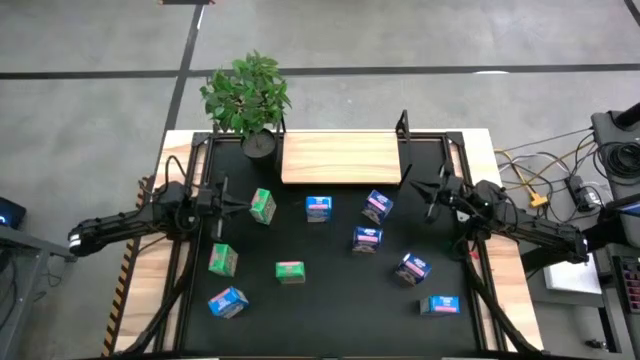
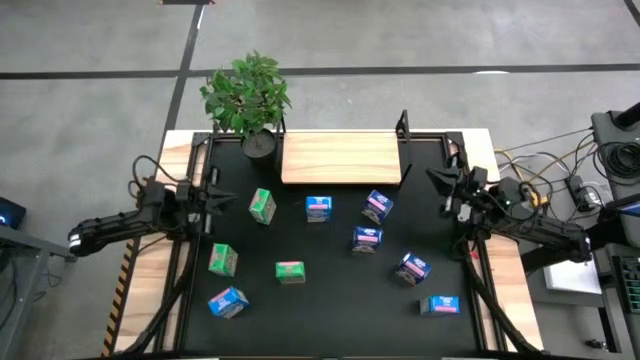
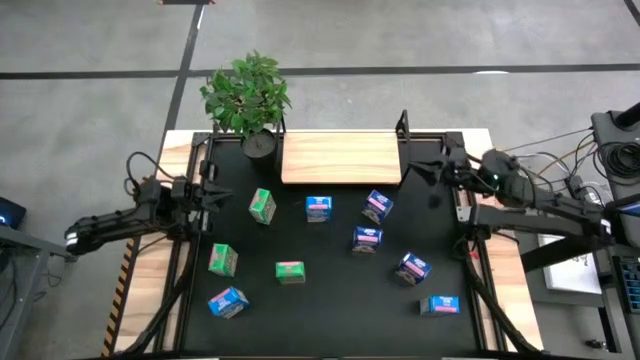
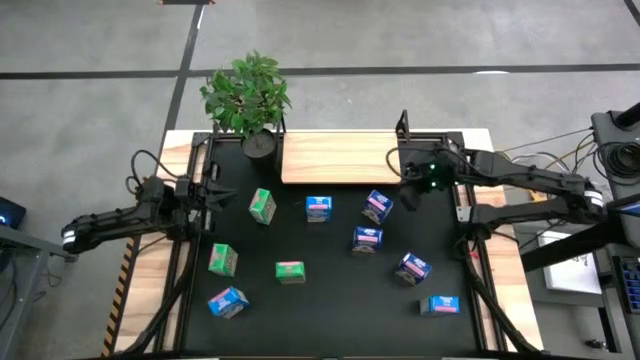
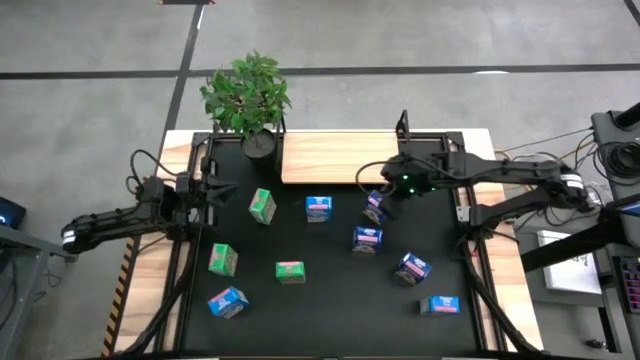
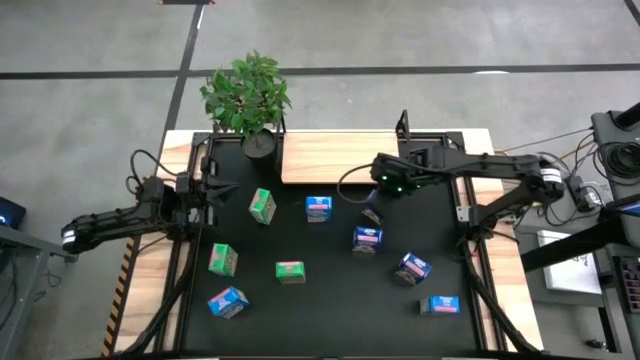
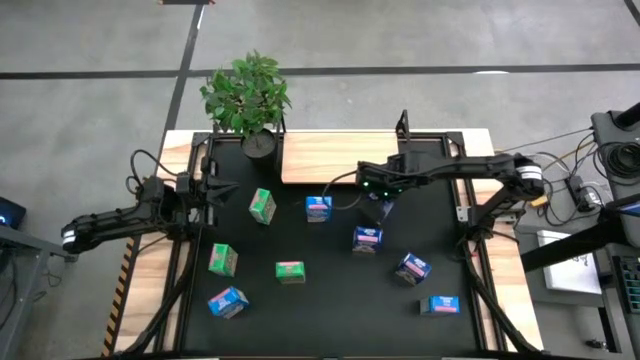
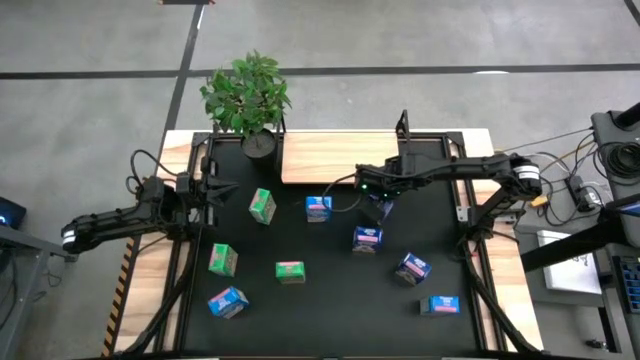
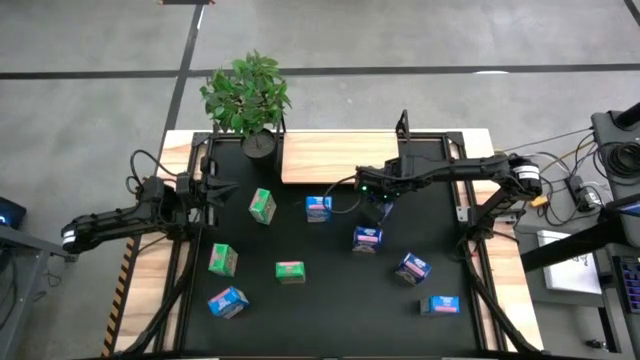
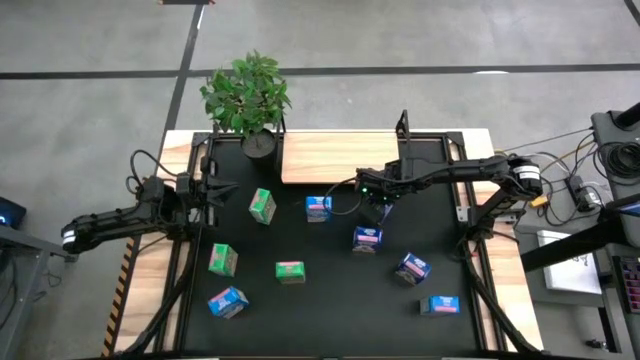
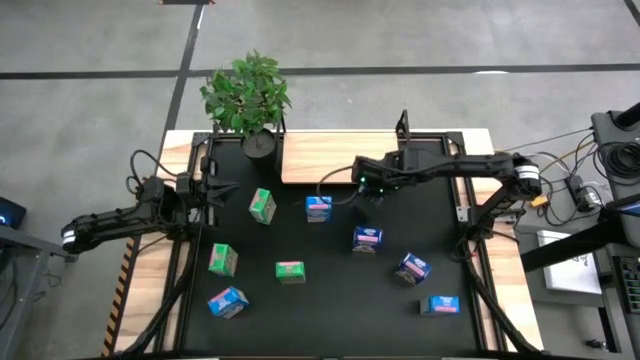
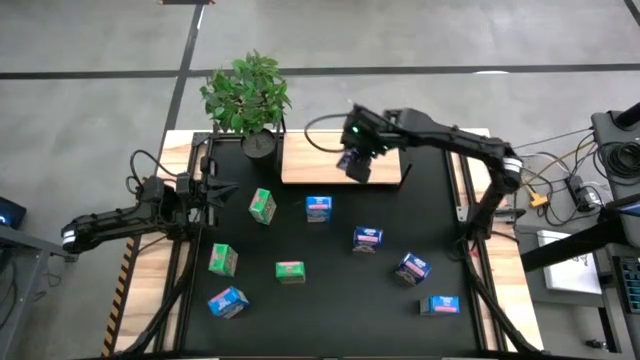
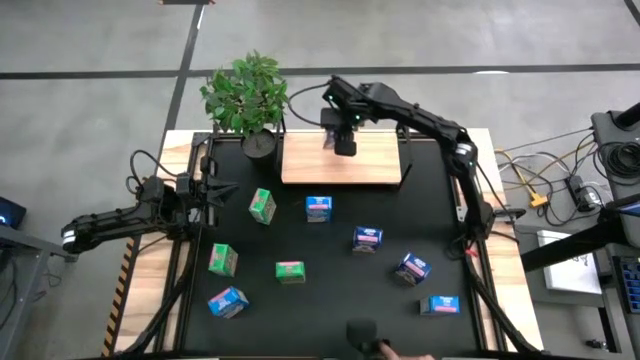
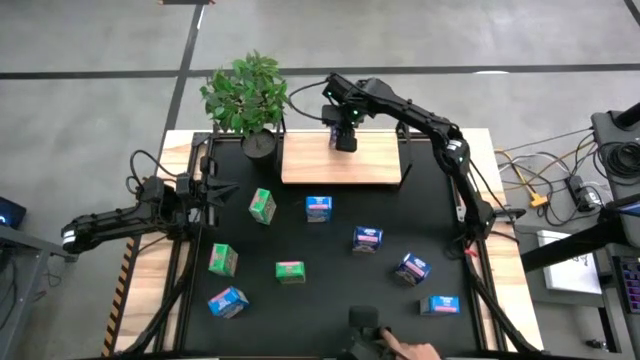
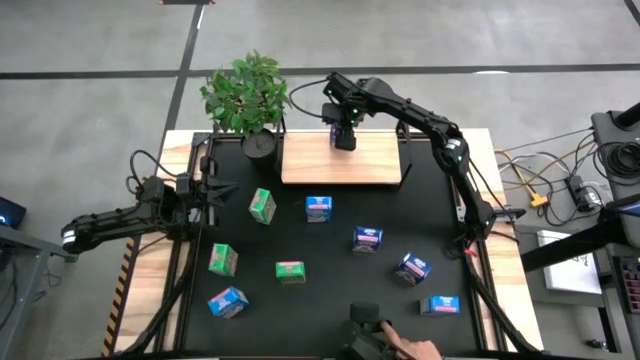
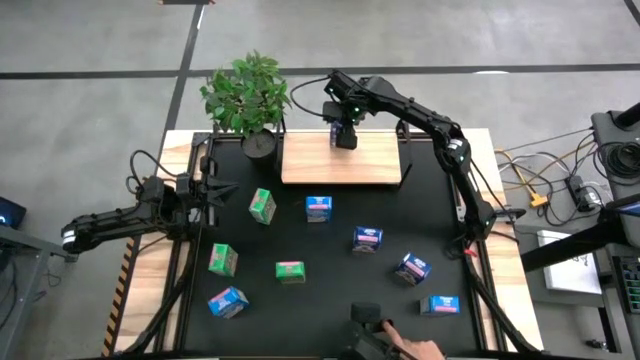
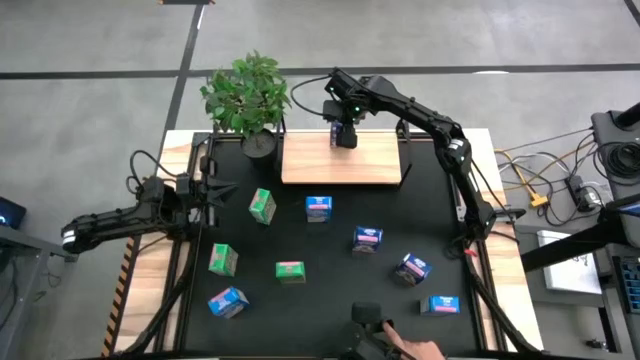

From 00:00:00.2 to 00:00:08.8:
Task: Stack cereal on shelf
Put the top blue cereal box on the shelf

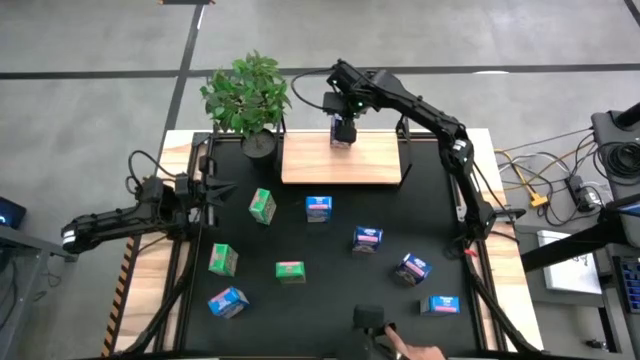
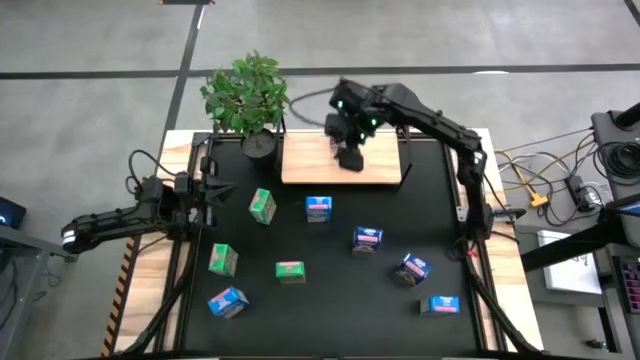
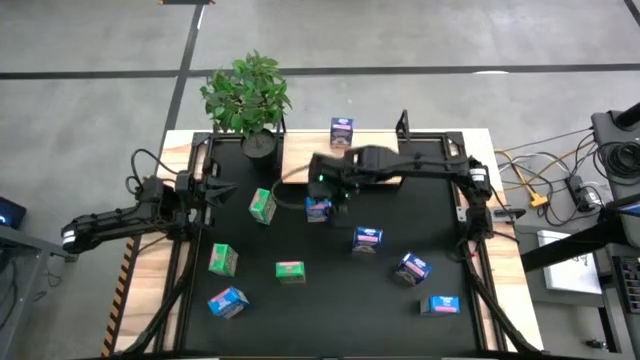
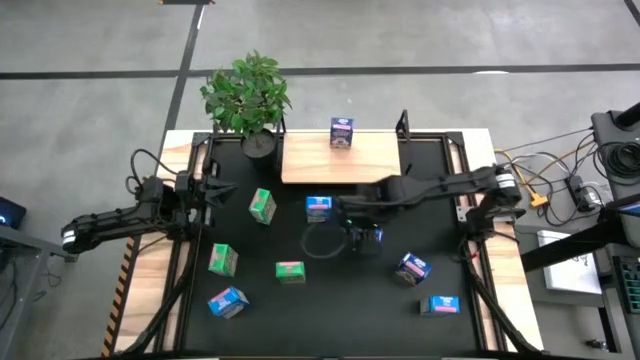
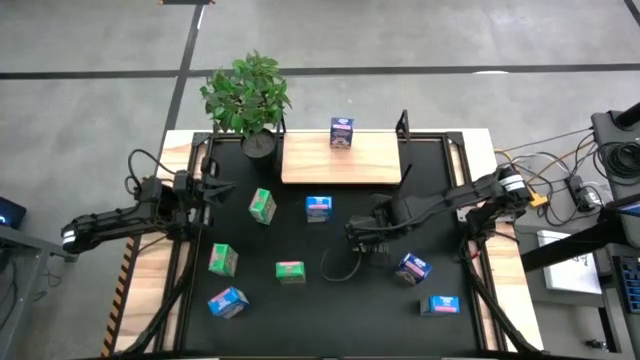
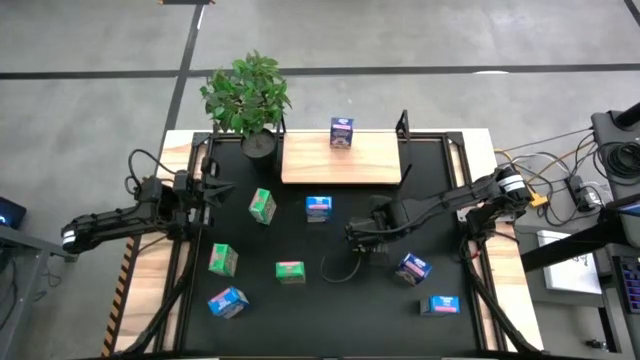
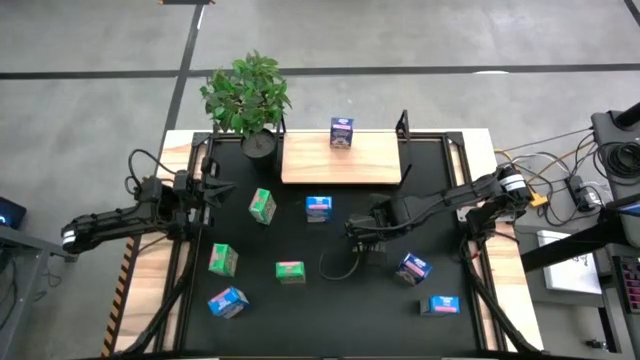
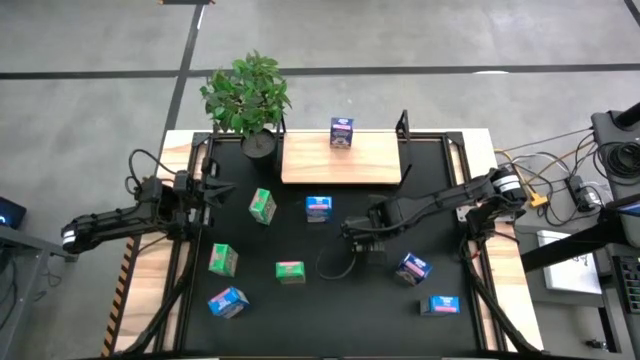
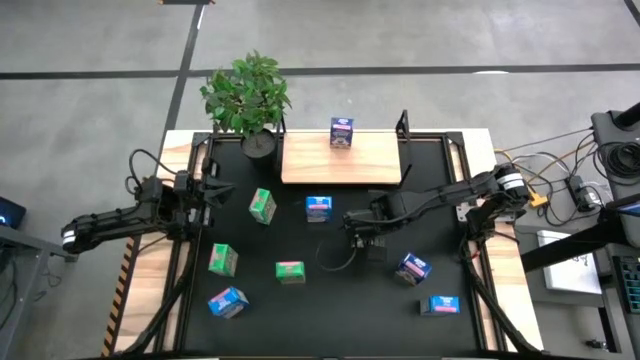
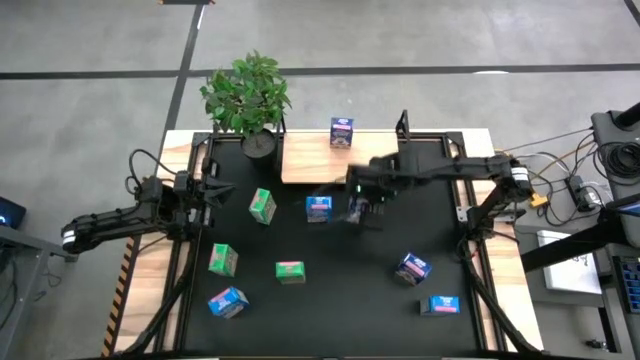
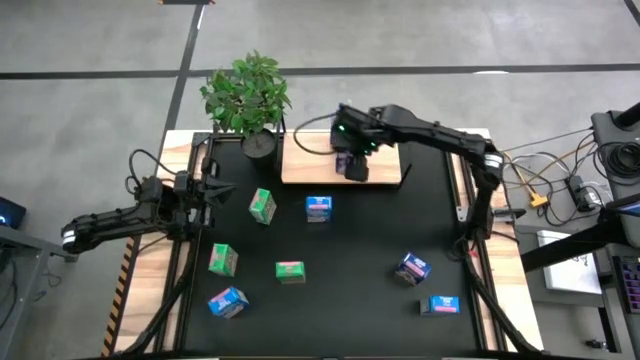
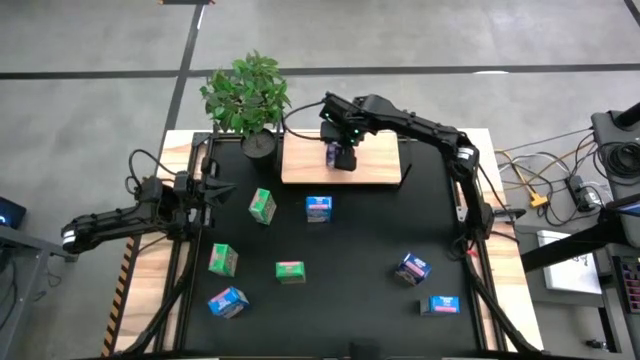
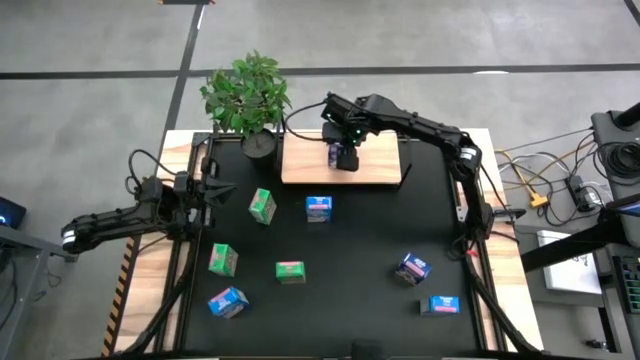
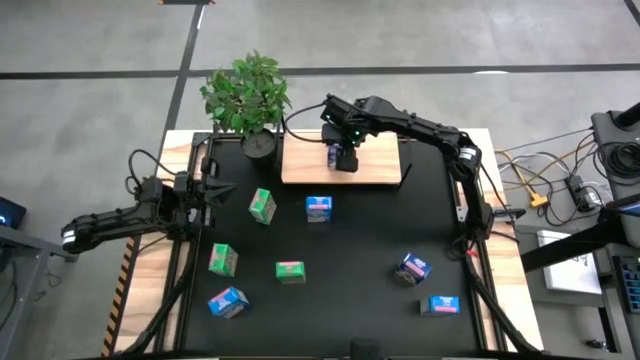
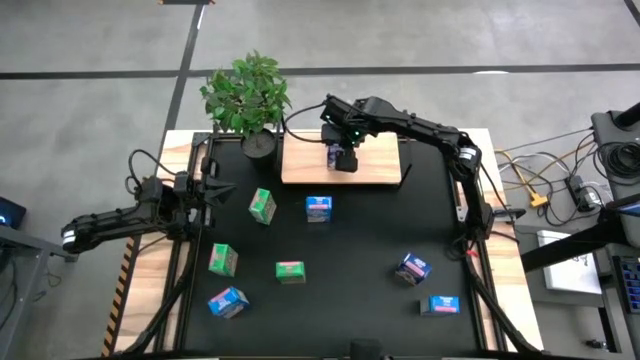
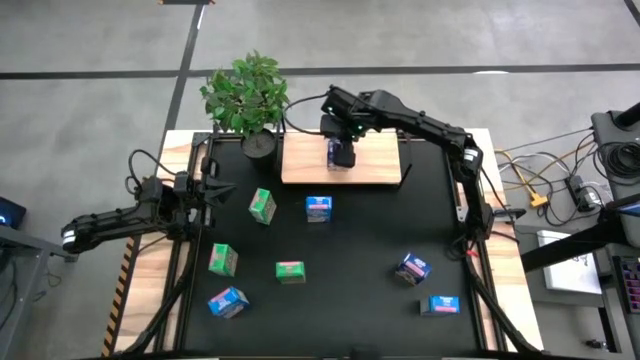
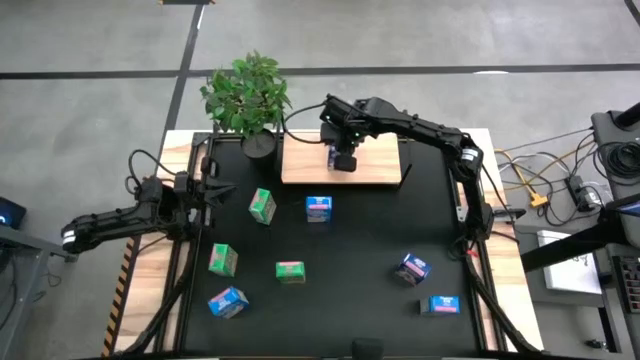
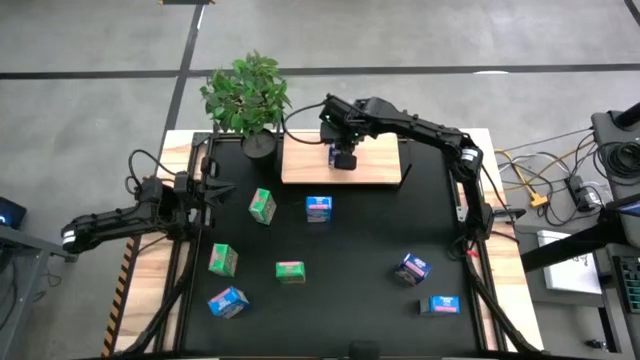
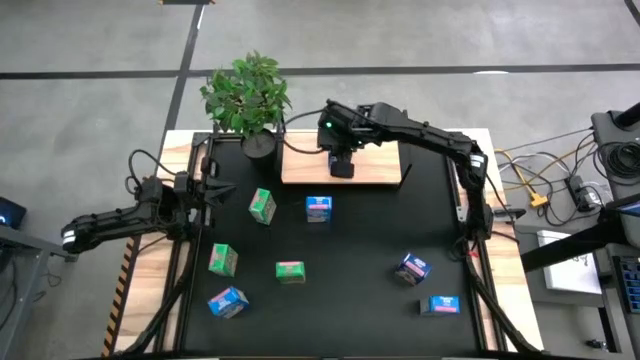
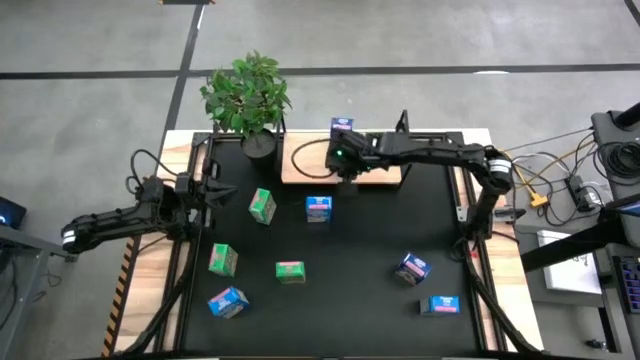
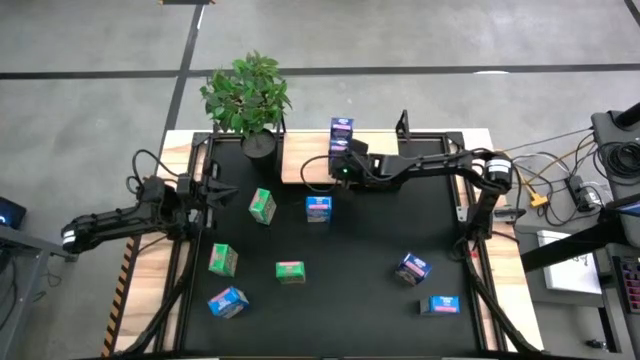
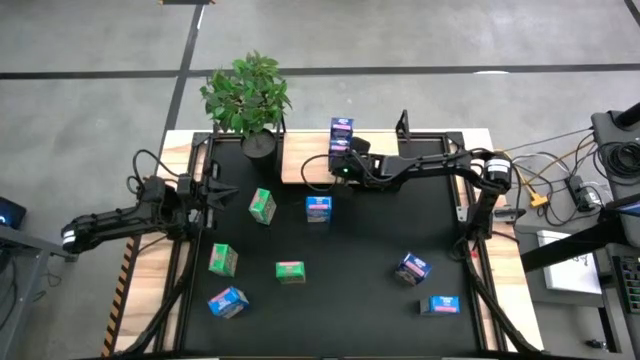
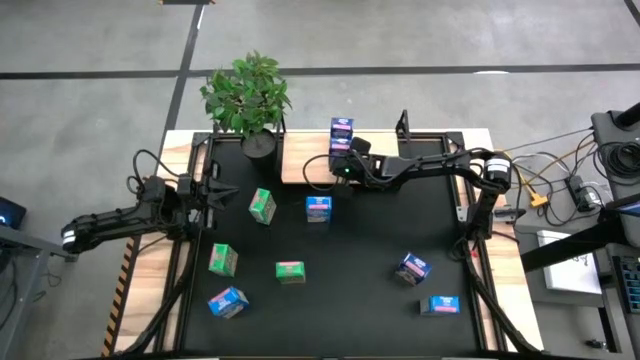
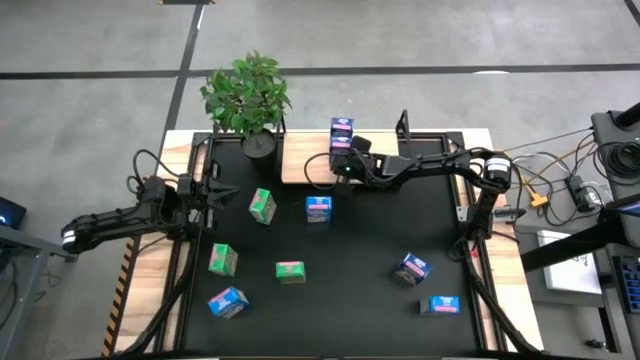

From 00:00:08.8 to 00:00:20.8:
Put the top blue cereal box aligned with the blue cereal box on the shelf
